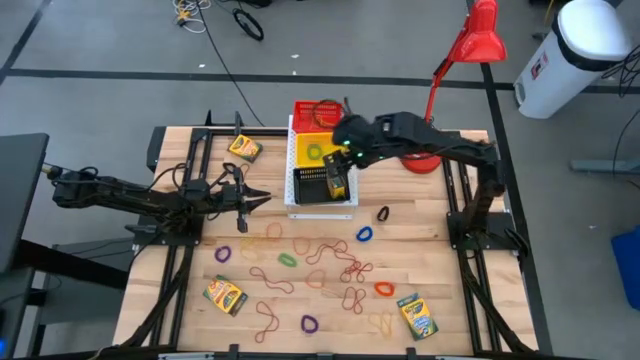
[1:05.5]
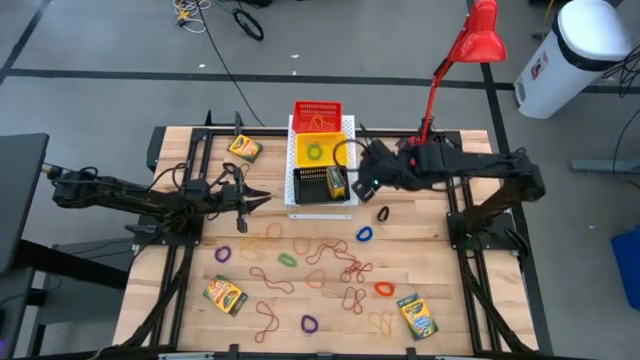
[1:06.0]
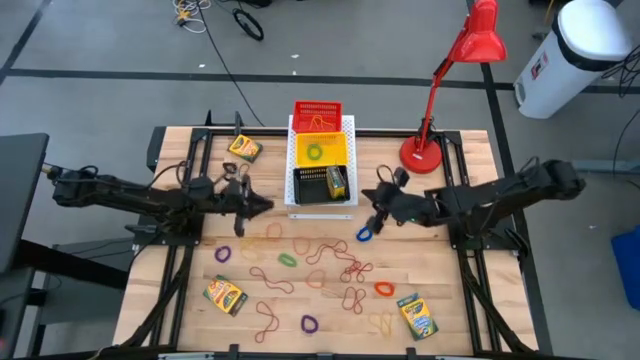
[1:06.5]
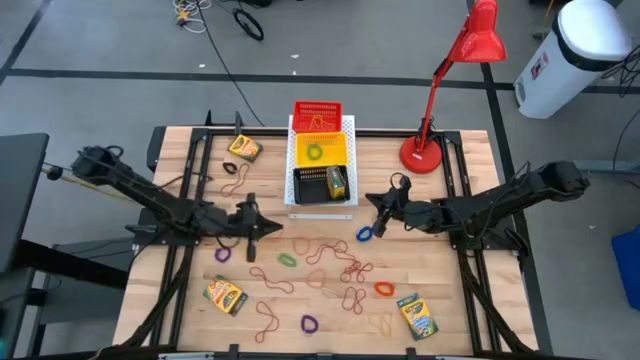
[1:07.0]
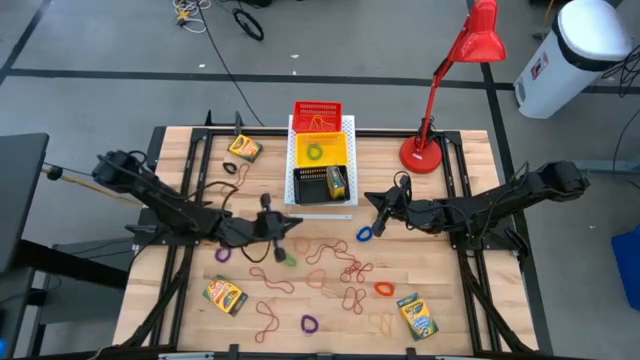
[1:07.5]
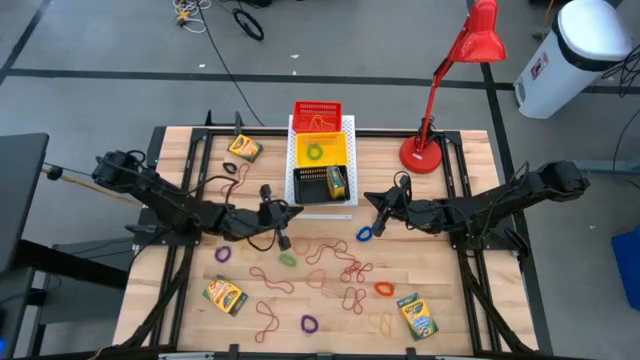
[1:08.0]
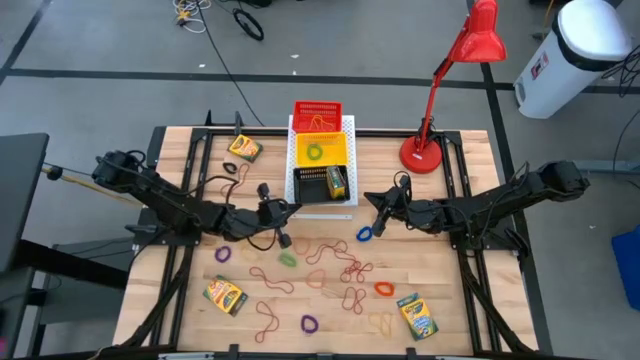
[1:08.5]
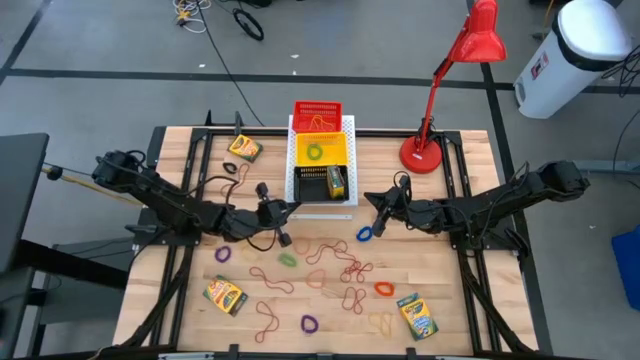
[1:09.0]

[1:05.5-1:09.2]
Task: Pick & Place Office Desk Supplies
Adjust the black bin on the shelf

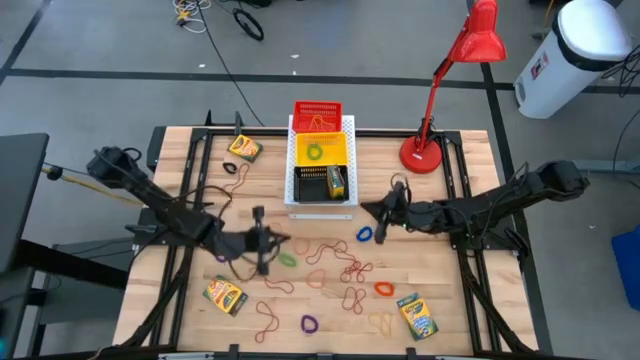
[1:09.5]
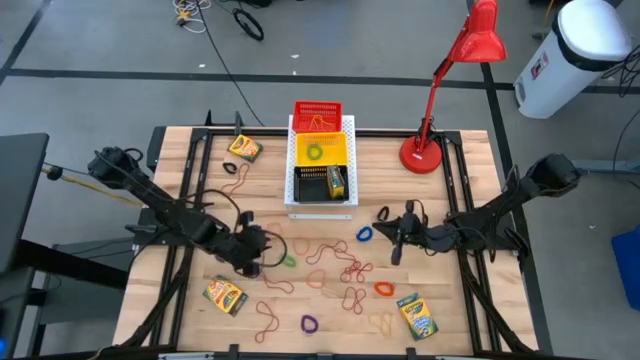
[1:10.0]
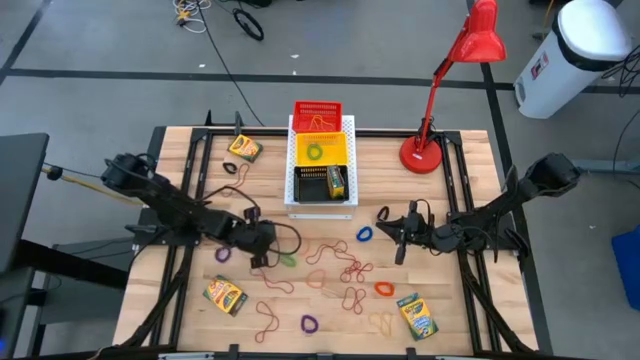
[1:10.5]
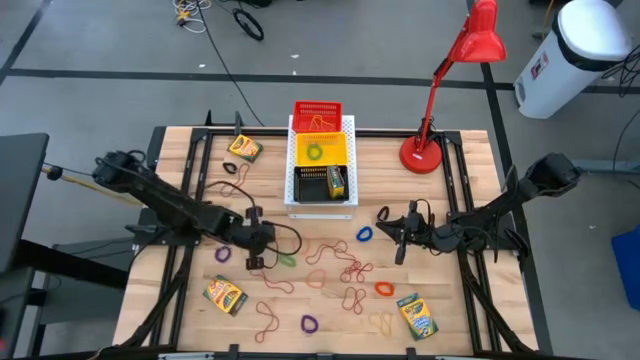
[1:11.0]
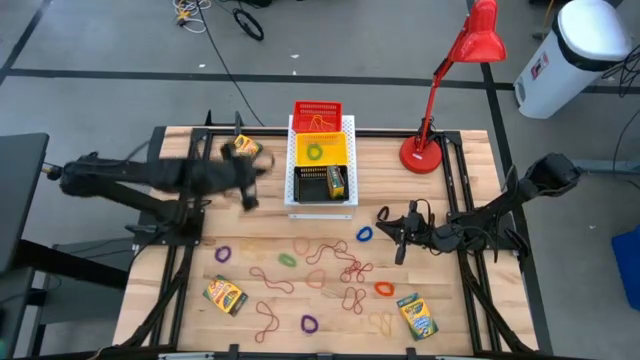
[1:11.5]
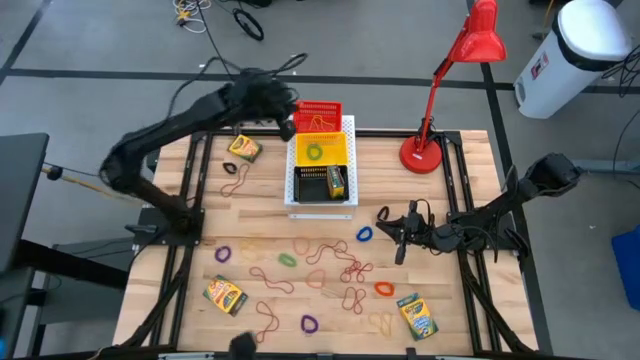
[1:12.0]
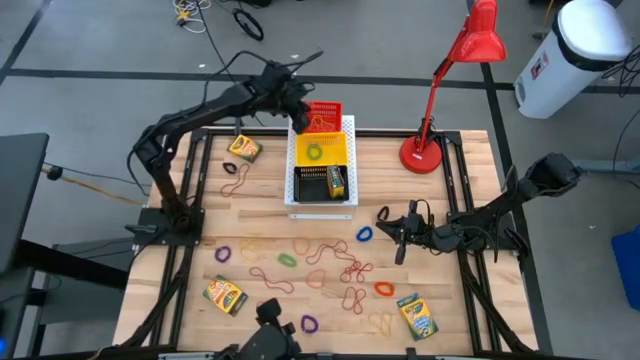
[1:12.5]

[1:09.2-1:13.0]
Put the orange rubber band into the red bin on the shelf

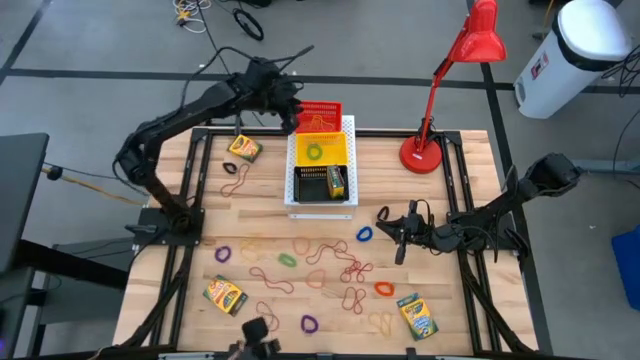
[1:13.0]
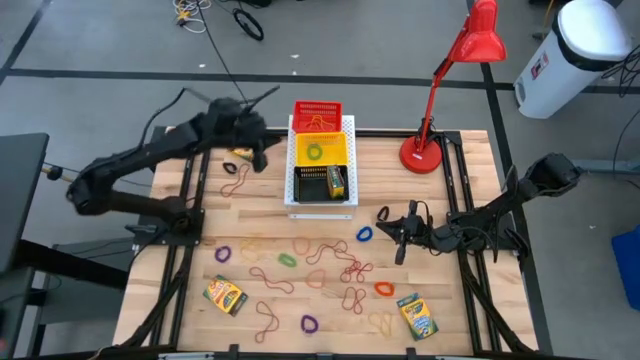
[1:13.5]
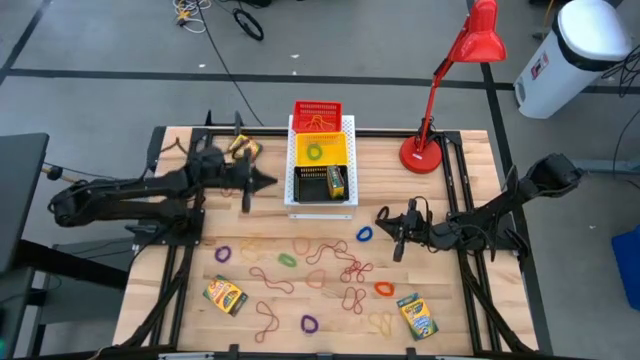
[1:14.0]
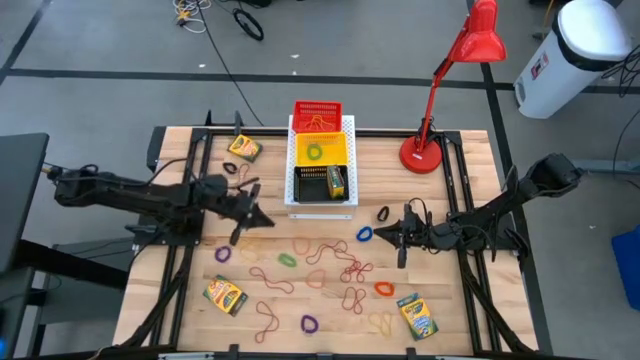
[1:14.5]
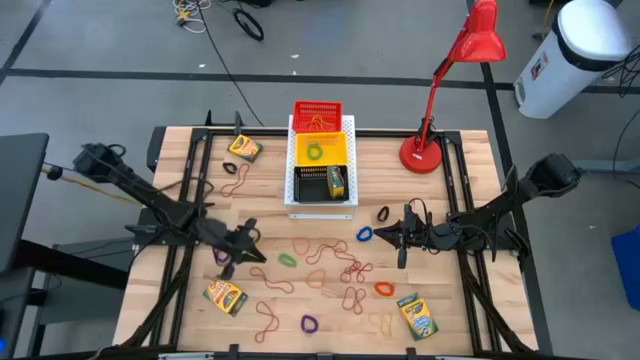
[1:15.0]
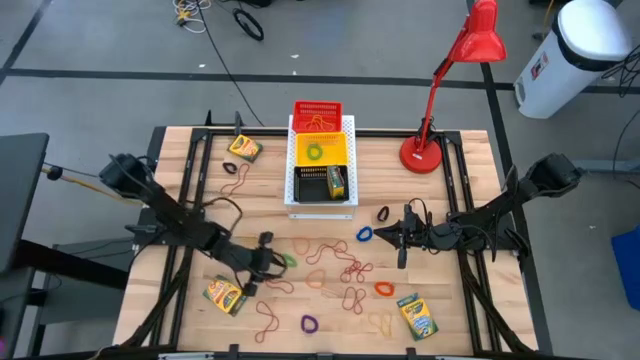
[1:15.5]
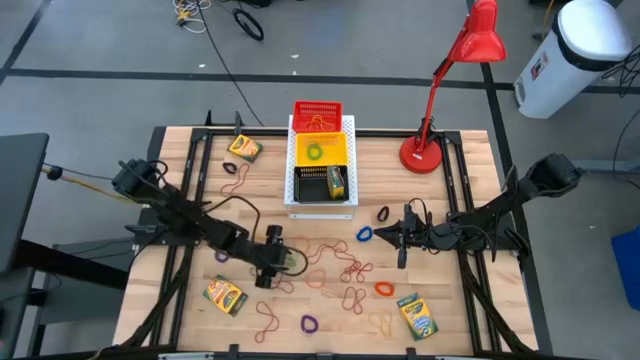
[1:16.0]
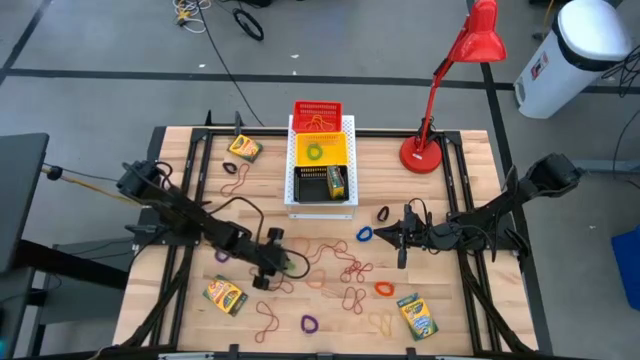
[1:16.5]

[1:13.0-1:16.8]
Put the green spring keychain into the yellow bin on the shelf

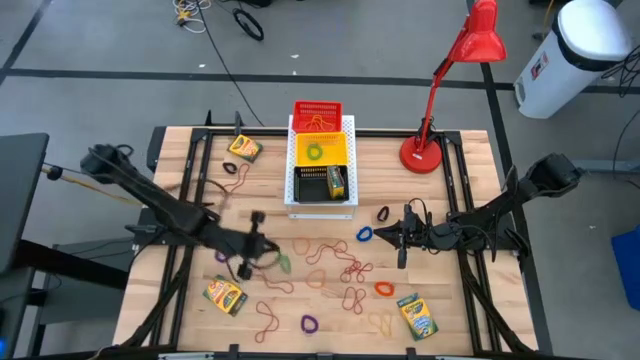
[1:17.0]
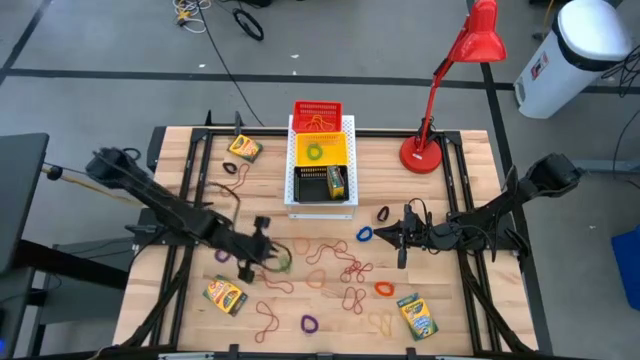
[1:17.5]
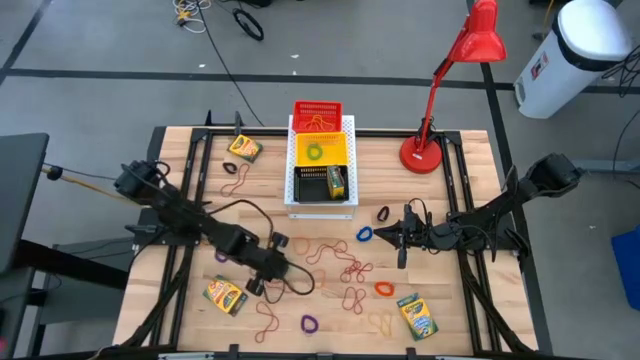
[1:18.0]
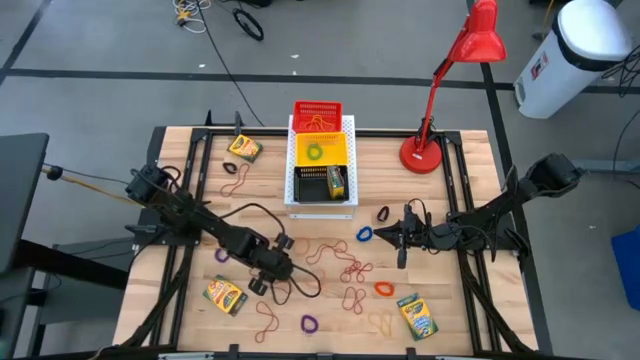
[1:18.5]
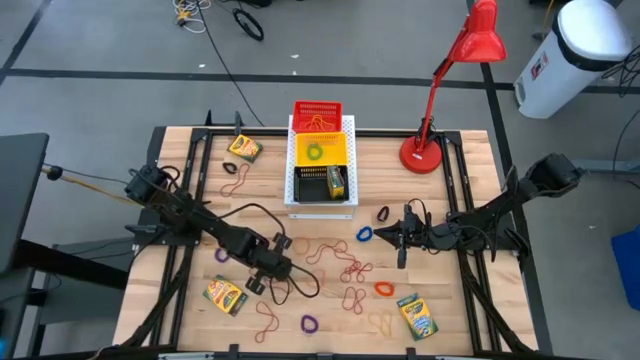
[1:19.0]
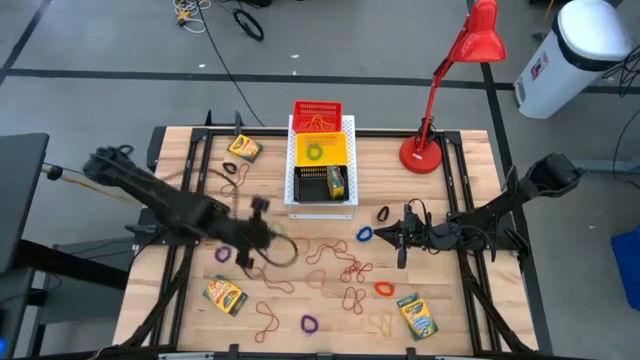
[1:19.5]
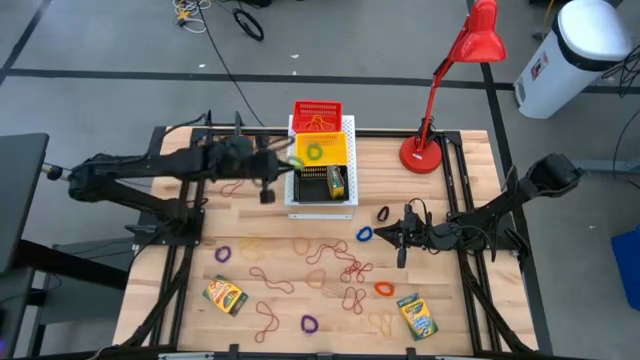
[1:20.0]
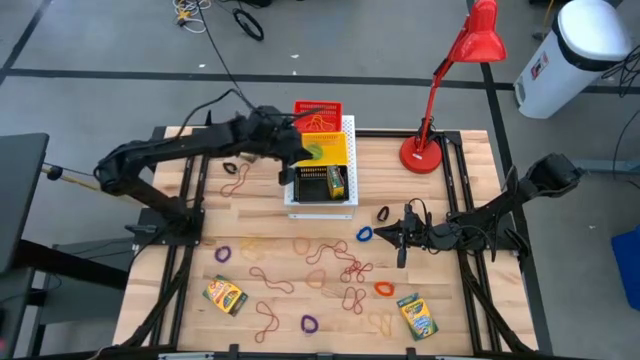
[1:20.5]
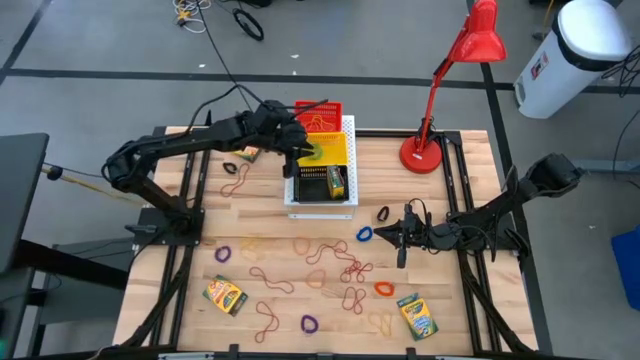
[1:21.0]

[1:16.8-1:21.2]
Put the green spring keychain into the yellow bin on the shelf

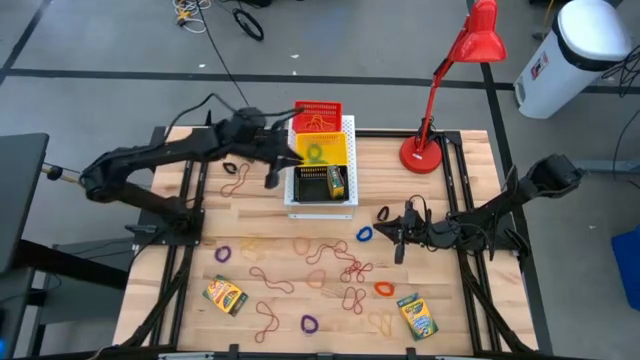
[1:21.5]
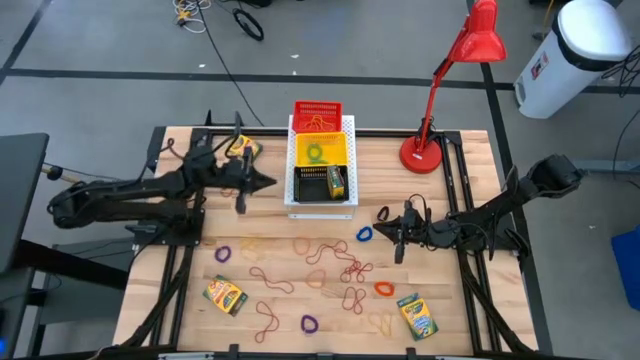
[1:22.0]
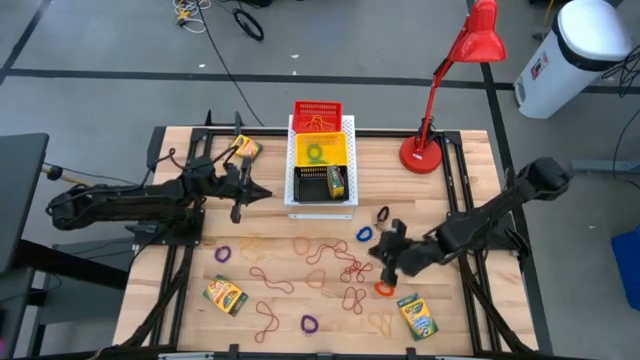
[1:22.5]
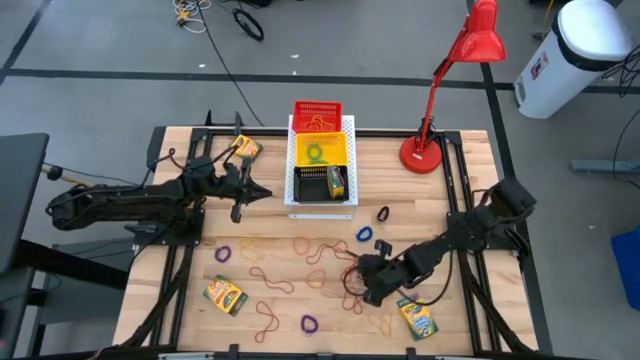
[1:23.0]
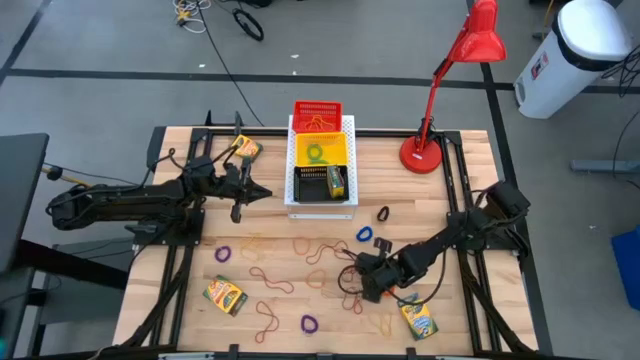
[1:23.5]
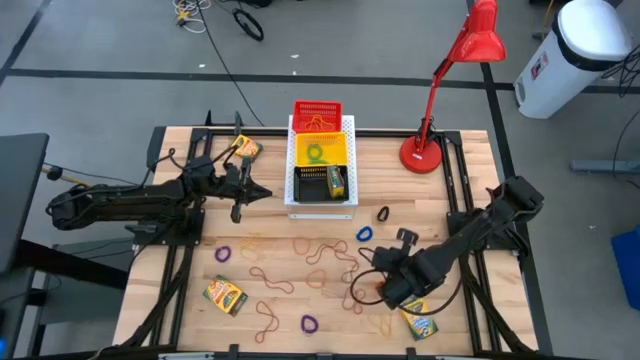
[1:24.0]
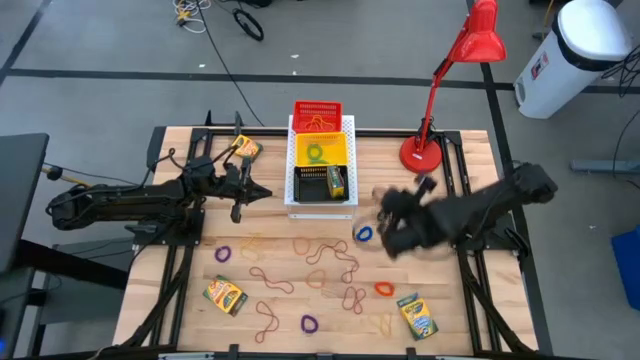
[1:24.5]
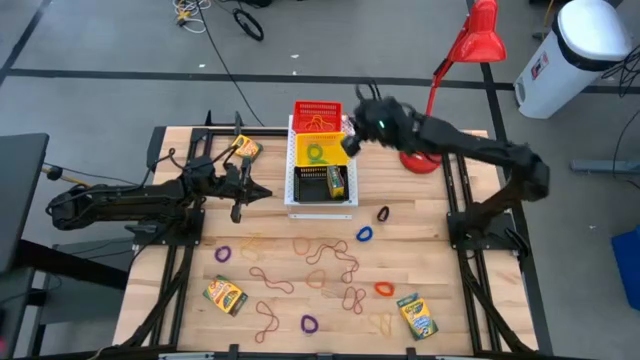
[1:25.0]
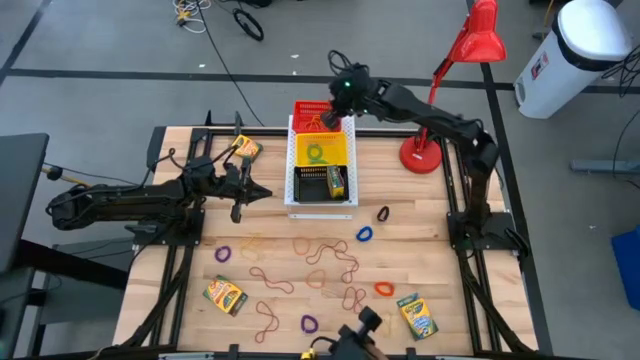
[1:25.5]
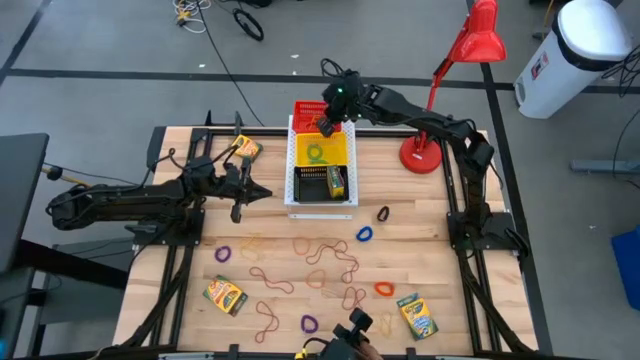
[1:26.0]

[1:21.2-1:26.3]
Put the red rubber band into the red bin on the shelf
